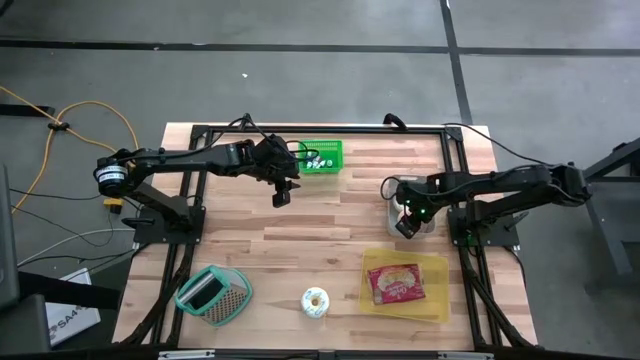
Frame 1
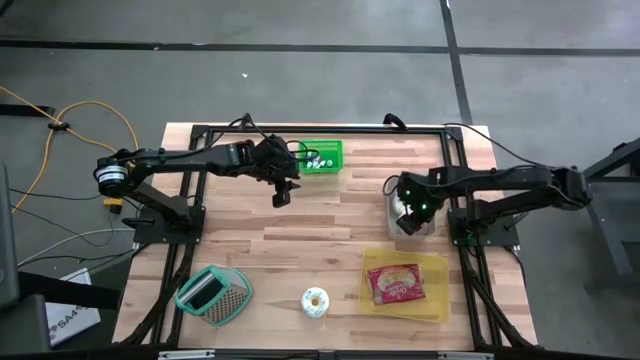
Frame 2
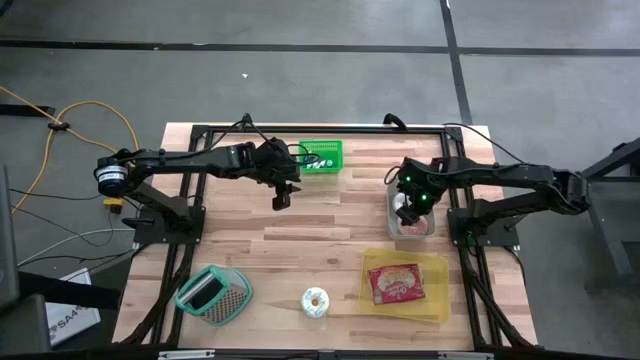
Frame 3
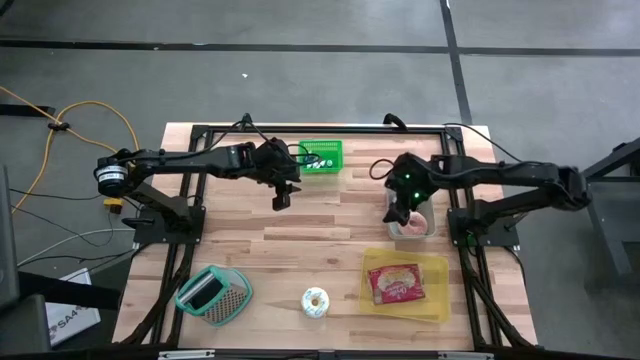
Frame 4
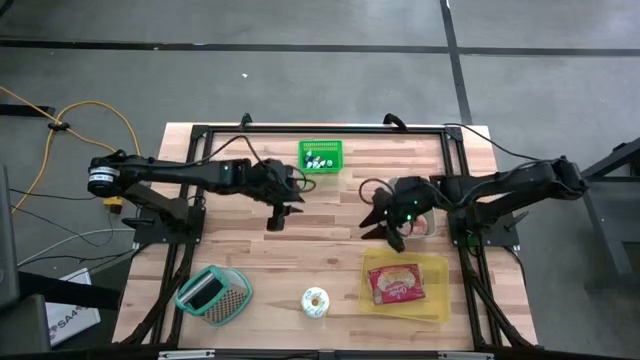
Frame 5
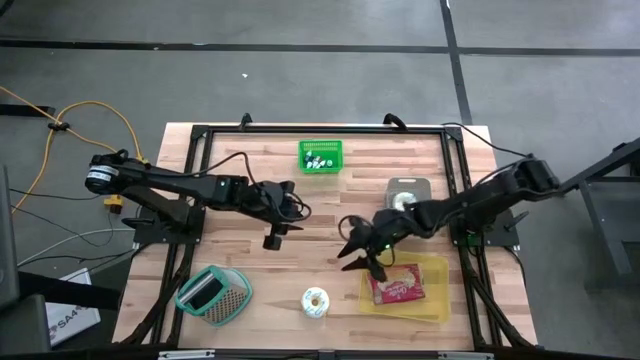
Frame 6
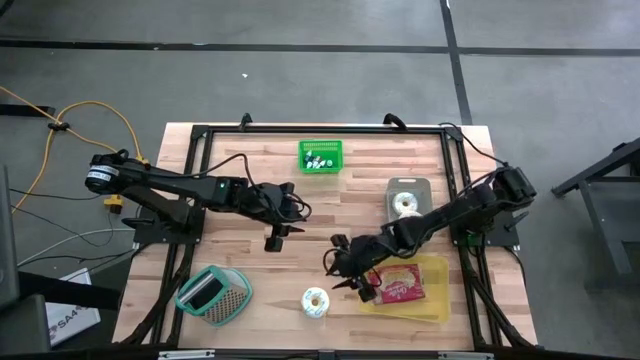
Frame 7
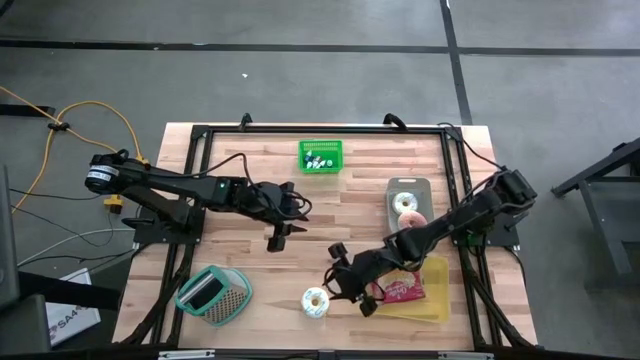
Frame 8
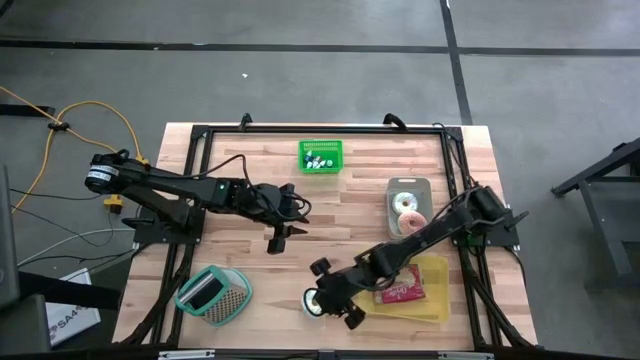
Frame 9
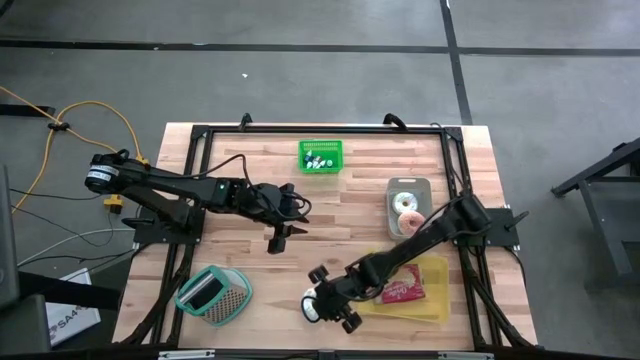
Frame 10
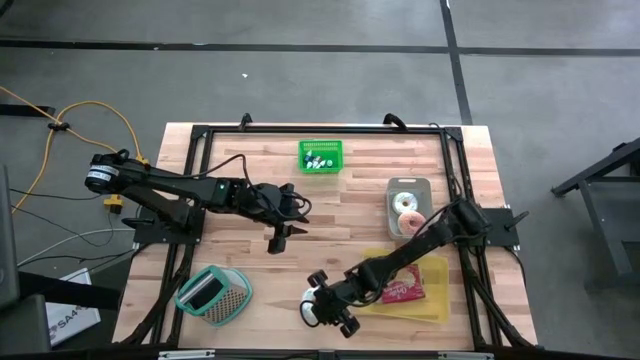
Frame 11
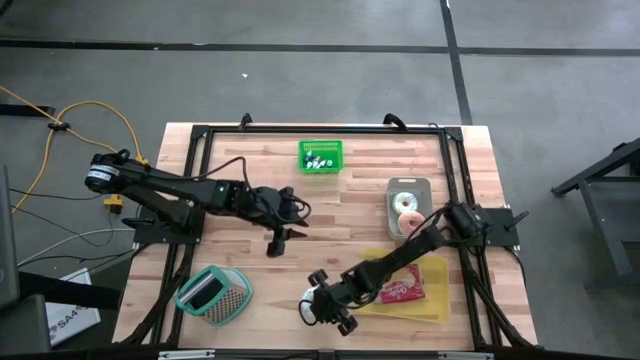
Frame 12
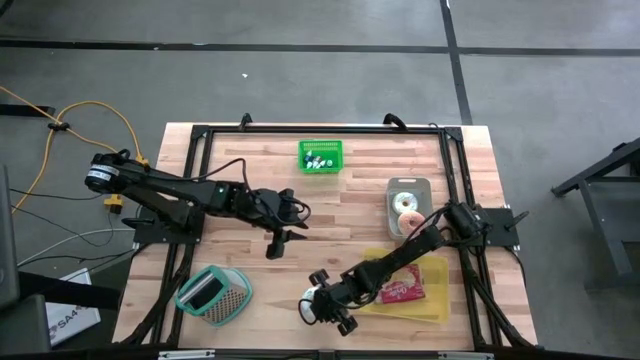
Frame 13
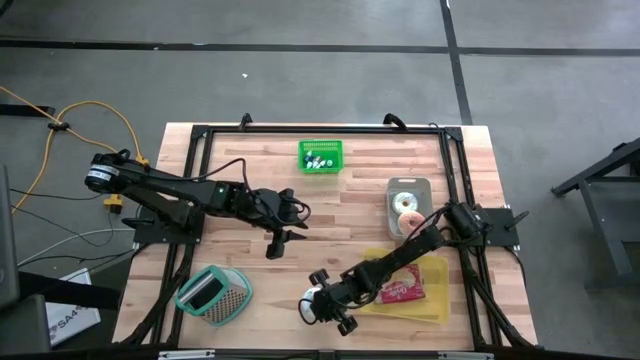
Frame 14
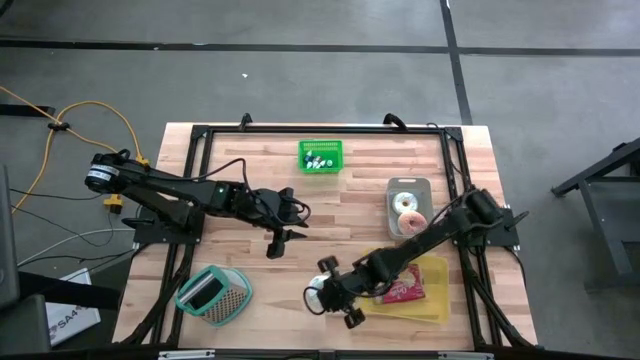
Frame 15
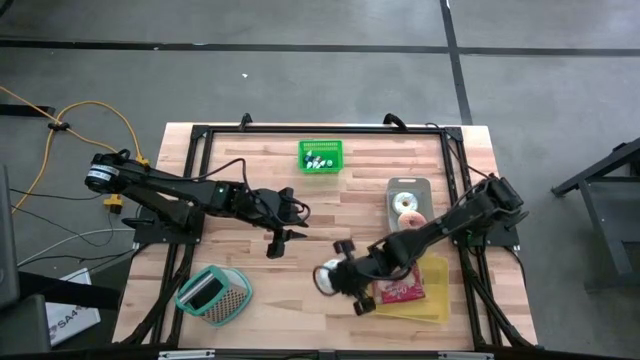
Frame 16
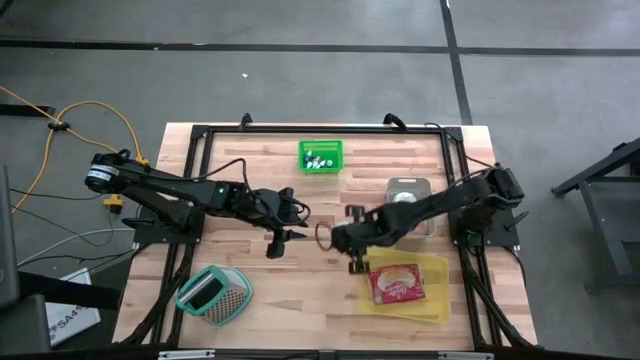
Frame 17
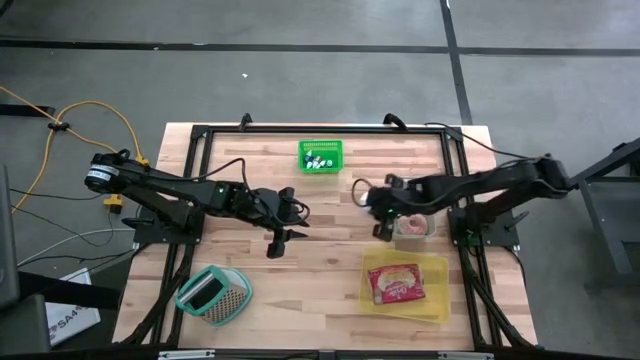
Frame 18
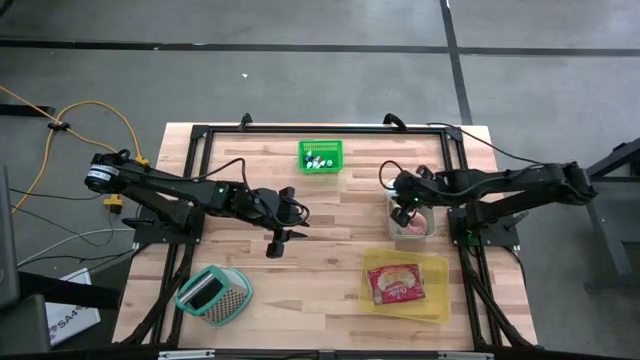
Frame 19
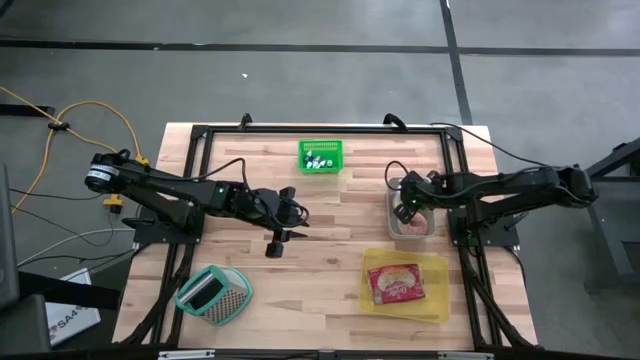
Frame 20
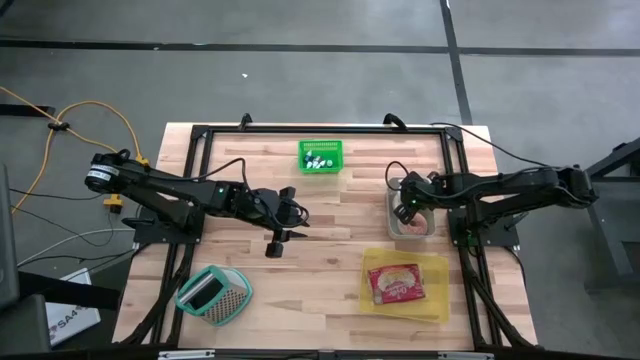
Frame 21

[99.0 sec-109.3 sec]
Put the white donut into the gray bin

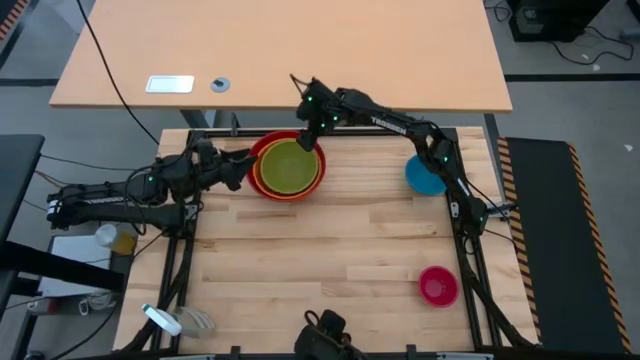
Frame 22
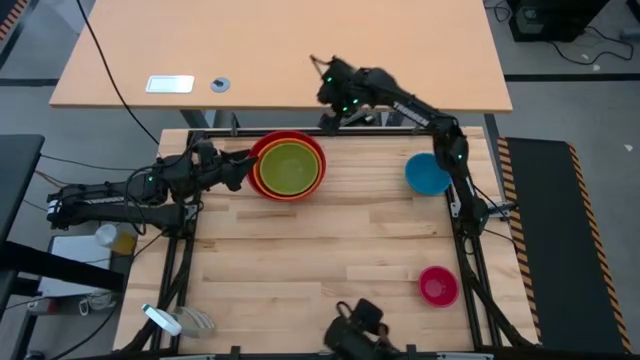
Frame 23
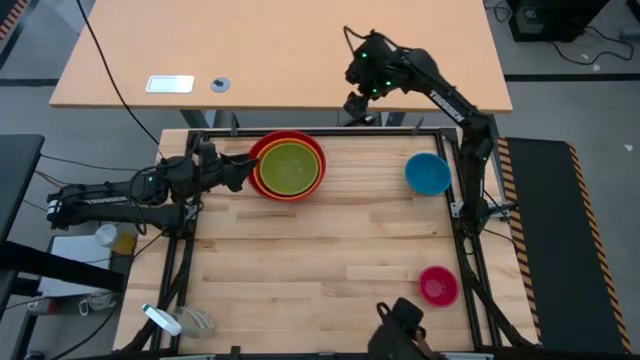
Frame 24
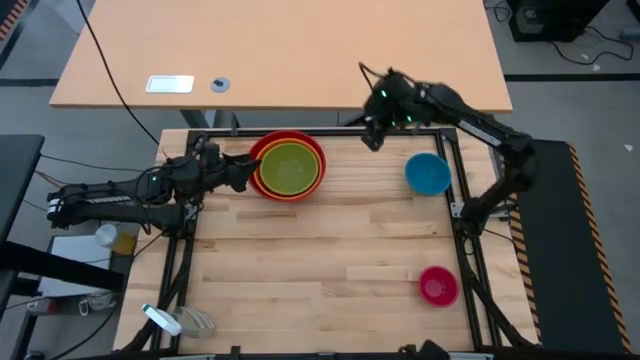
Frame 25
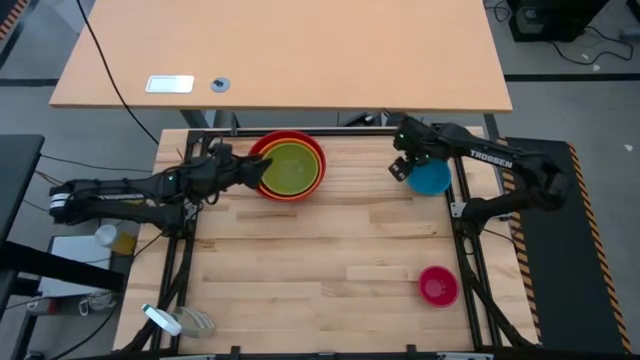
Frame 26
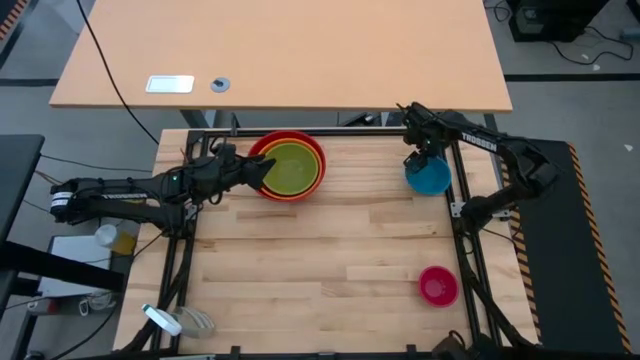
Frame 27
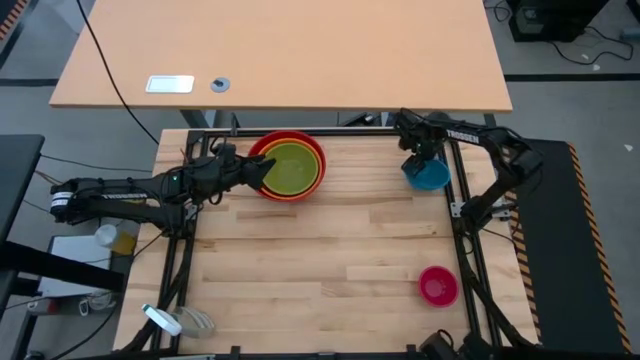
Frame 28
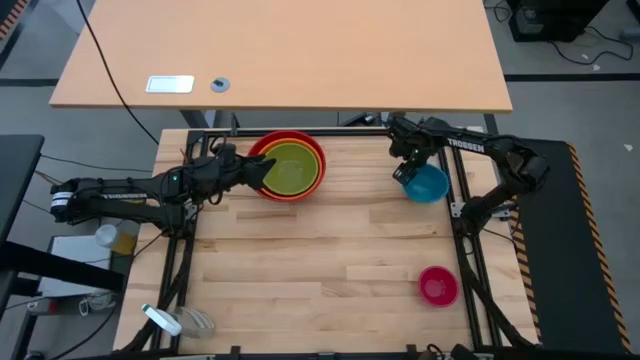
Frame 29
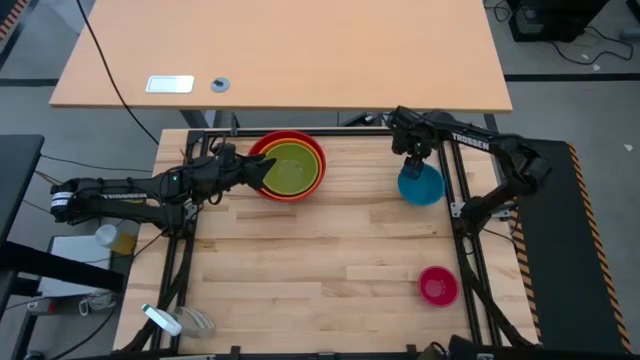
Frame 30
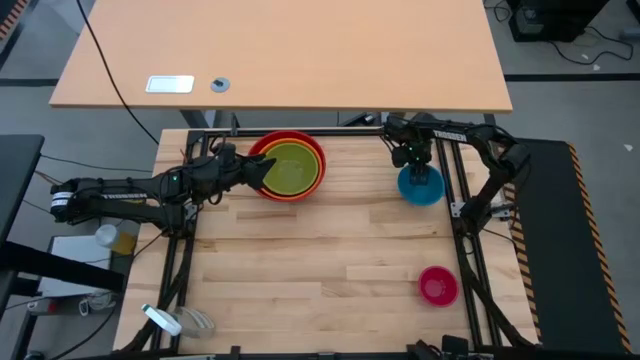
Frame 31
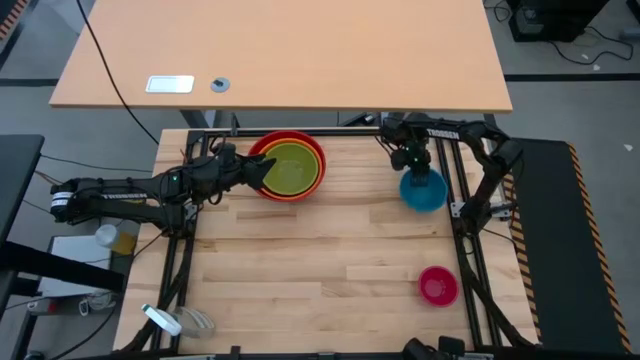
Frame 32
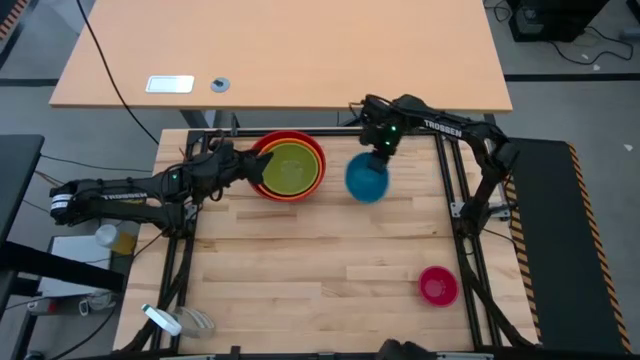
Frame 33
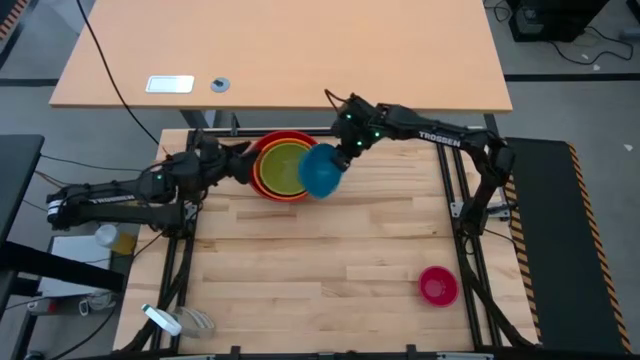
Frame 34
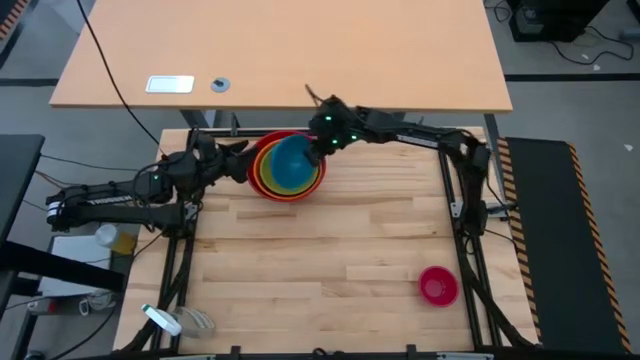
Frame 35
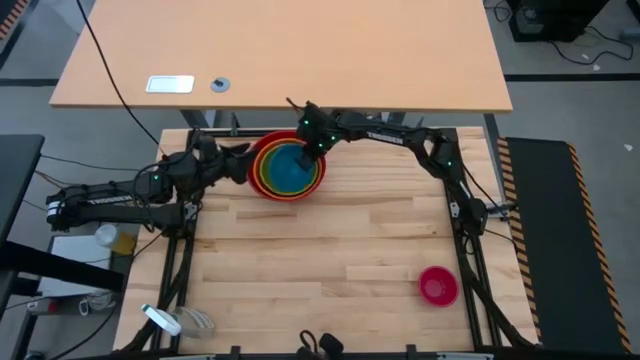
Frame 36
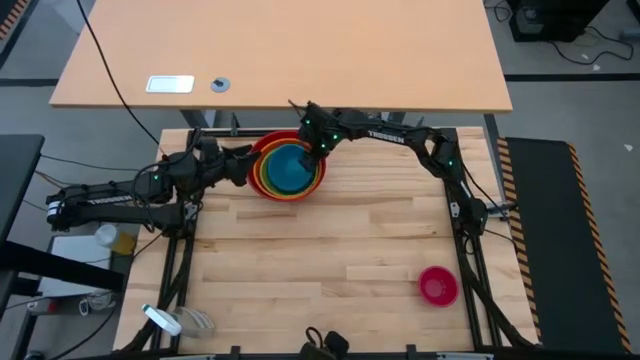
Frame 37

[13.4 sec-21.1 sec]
Stack the blue bowl on top of the green bowl

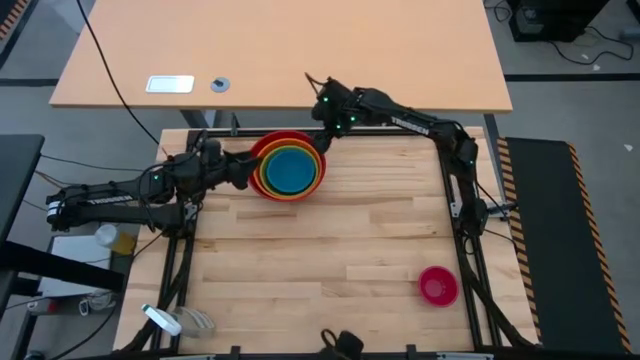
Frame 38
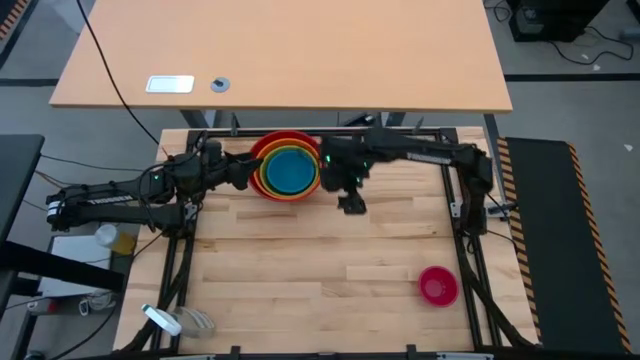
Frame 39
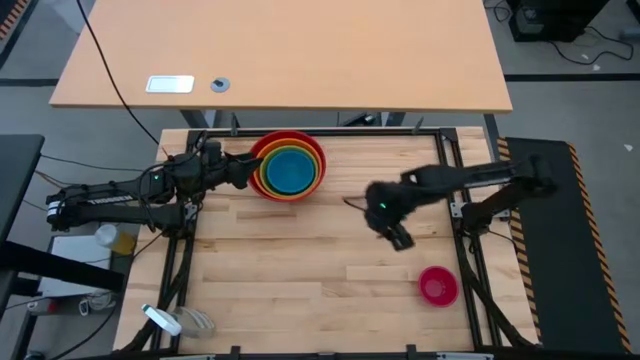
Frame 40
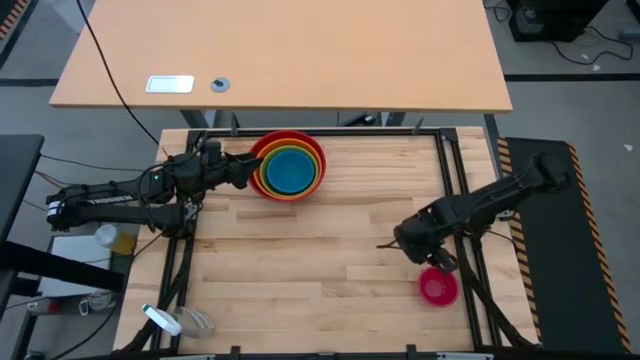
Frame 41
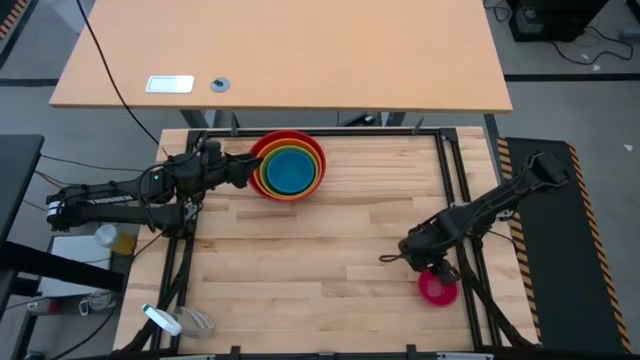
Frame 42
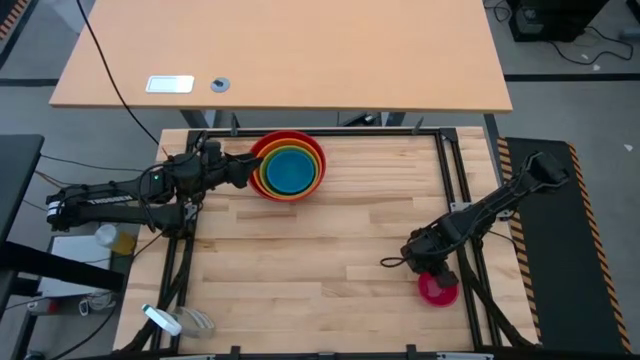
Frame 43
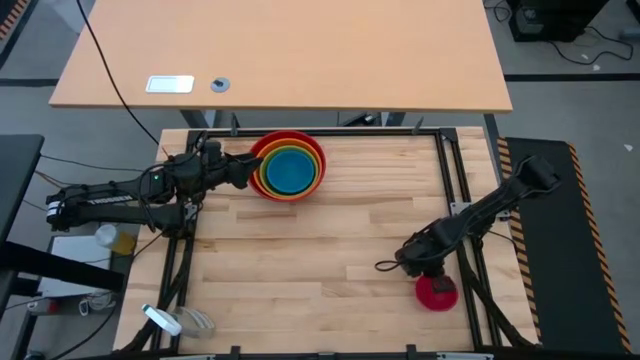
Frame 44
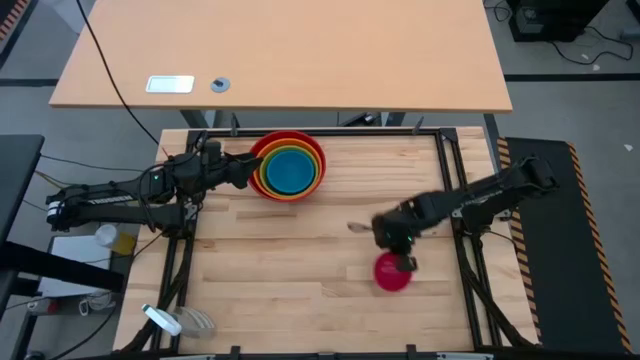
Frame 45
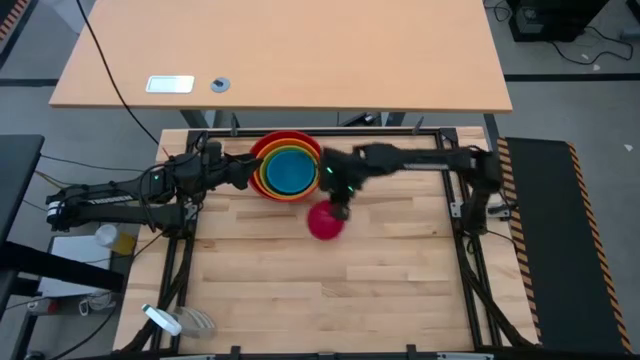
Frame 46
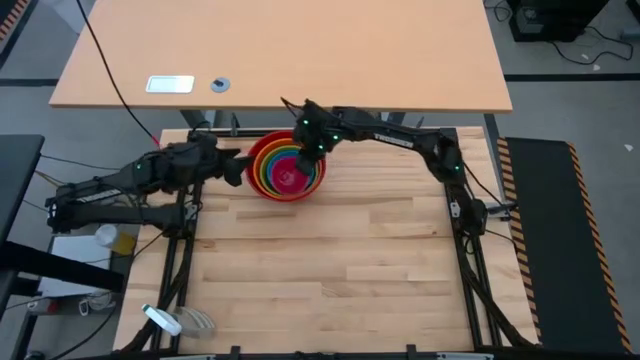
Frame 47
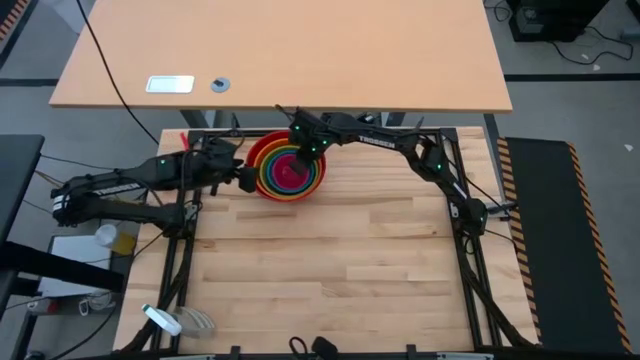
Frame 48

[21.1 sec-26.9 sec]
Stack the pink bowl on top of the blue bowl
